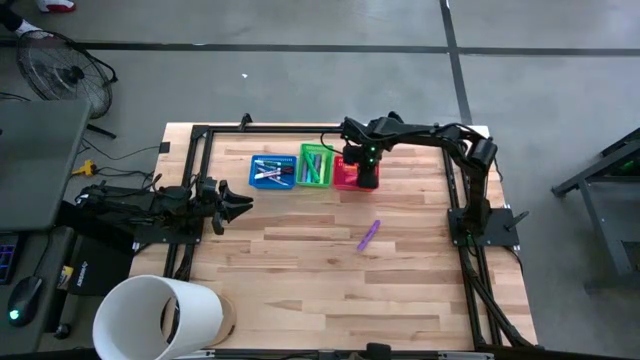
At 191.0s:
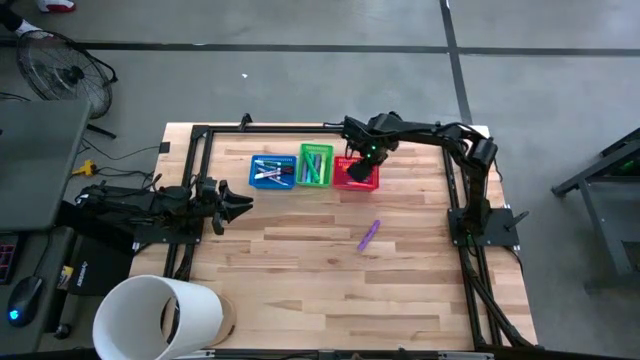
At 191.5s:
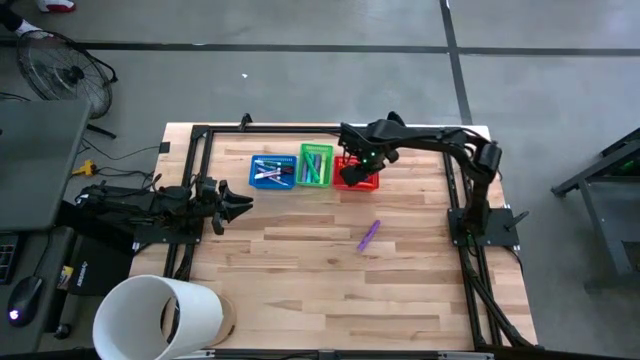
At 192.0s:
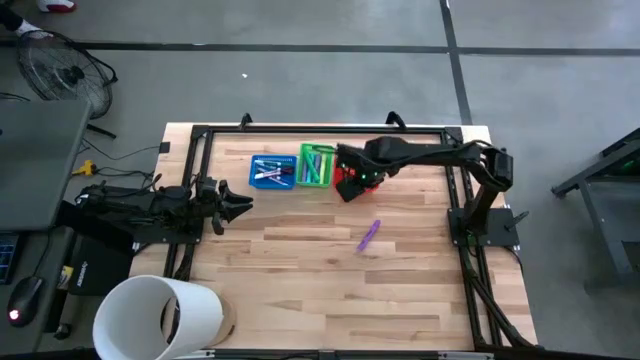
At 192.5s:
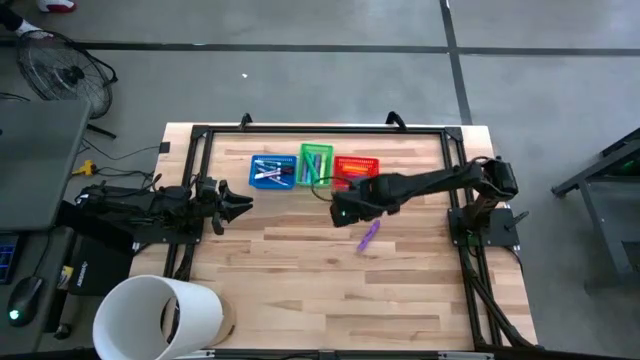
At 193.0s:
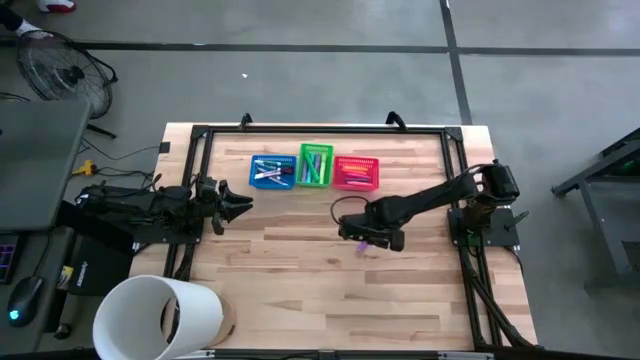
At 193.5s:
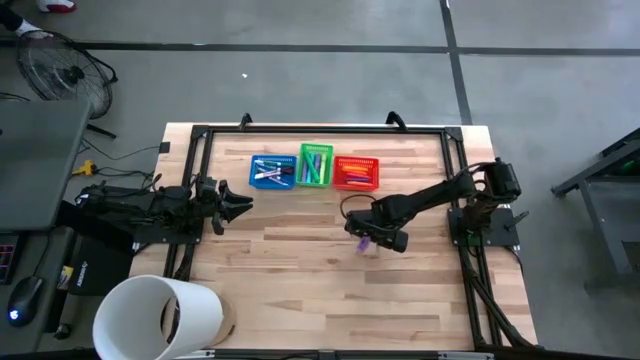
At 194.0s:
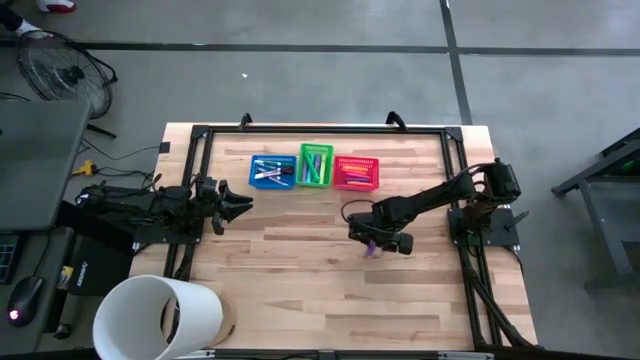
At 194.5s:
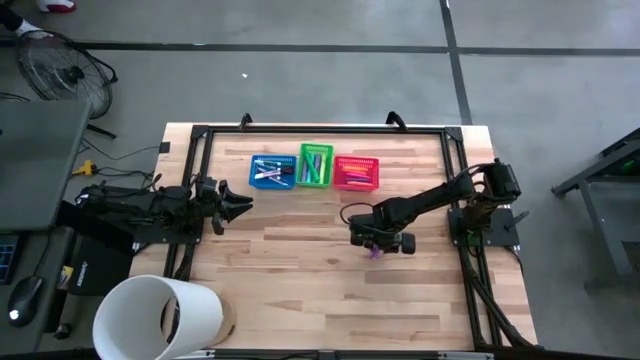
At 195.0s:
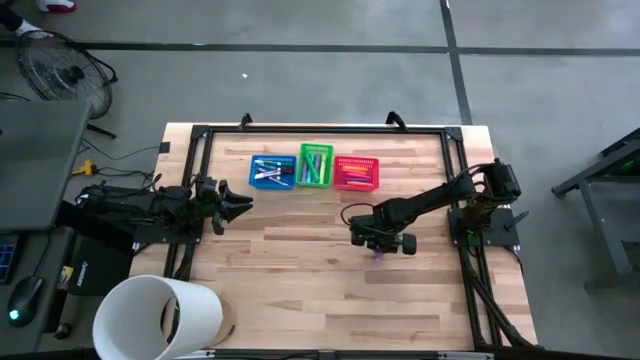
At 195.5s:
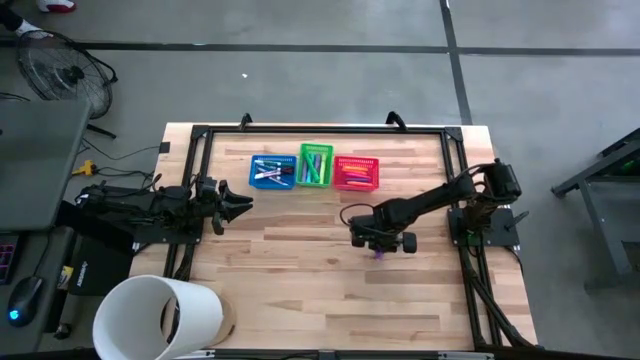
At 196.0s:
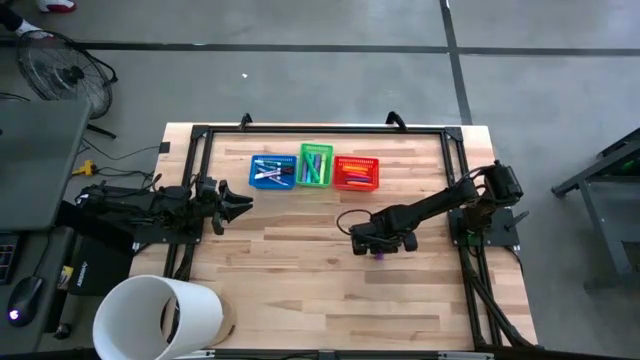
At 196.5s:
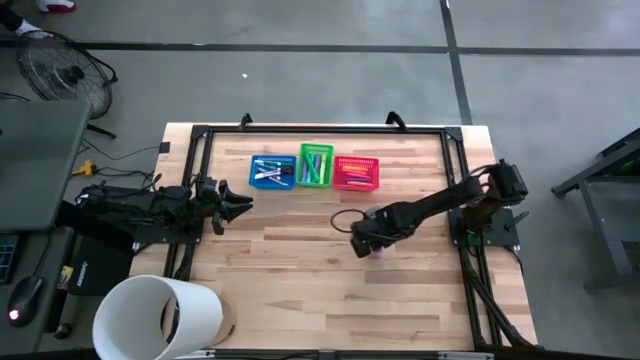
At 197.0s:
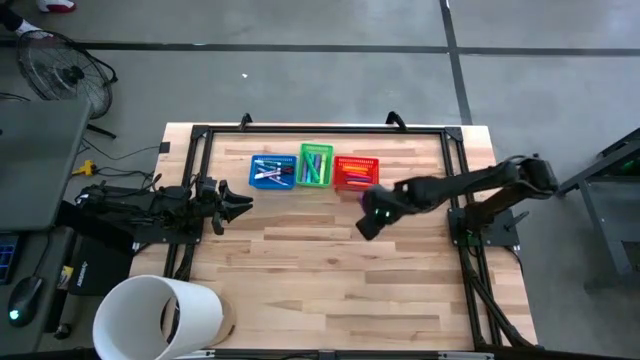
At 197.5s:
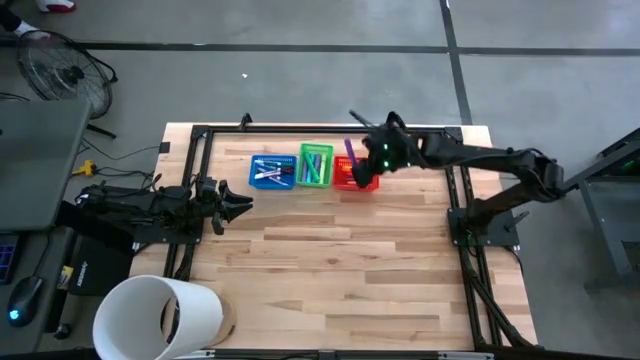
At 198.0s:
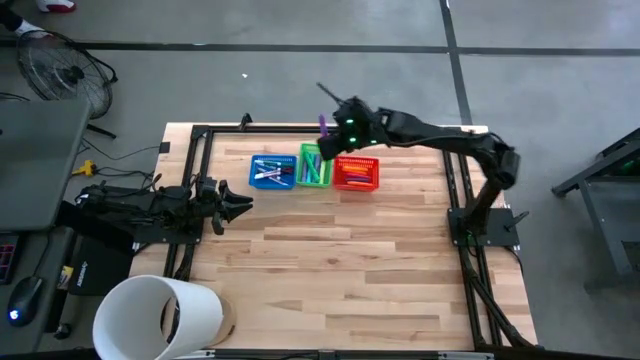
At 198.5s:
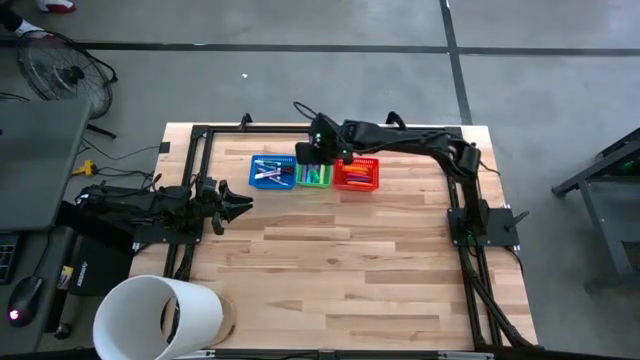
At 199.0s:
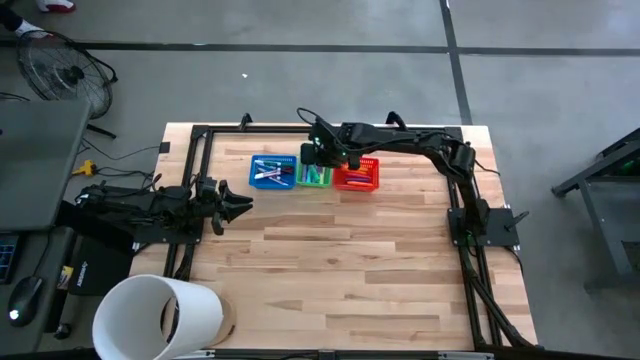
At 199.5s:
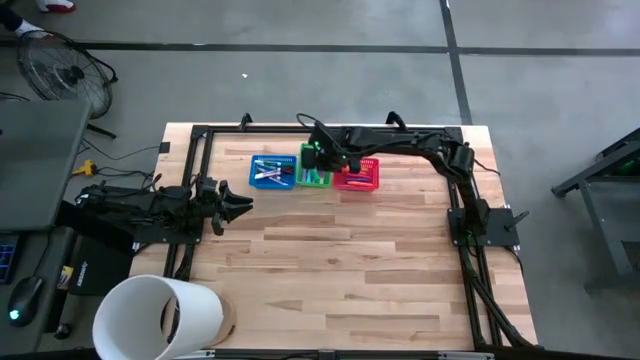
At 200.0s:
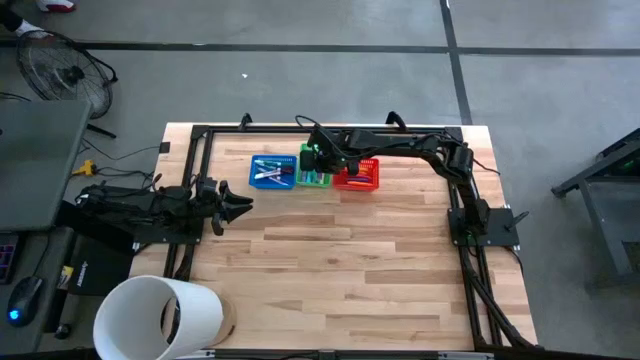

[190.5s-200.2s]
Task: Pick & Place Markers
Put the purple highlighter into the green bin

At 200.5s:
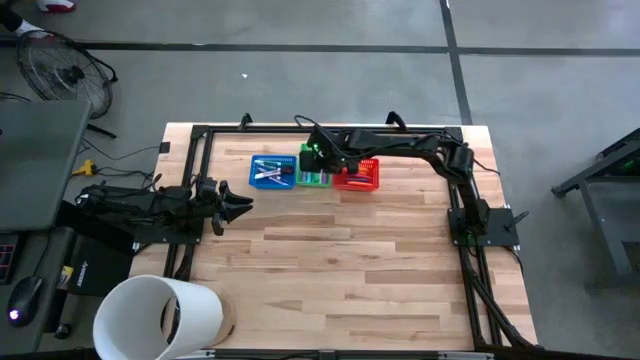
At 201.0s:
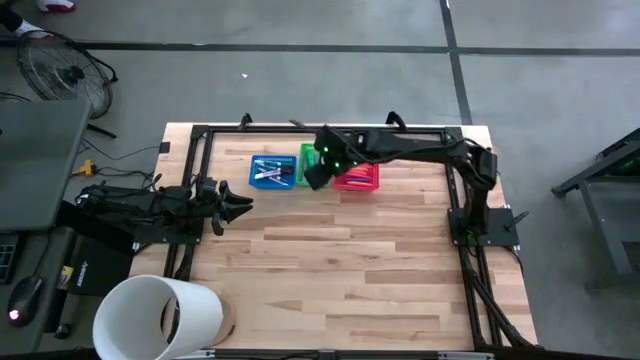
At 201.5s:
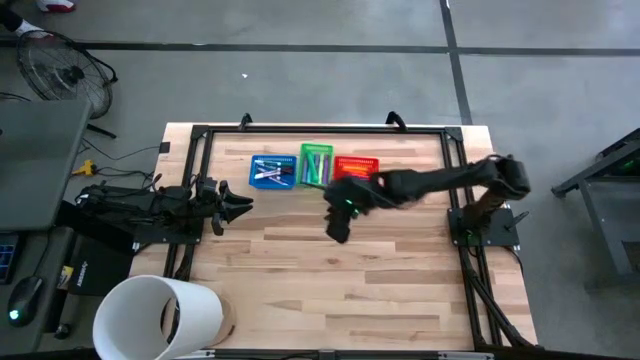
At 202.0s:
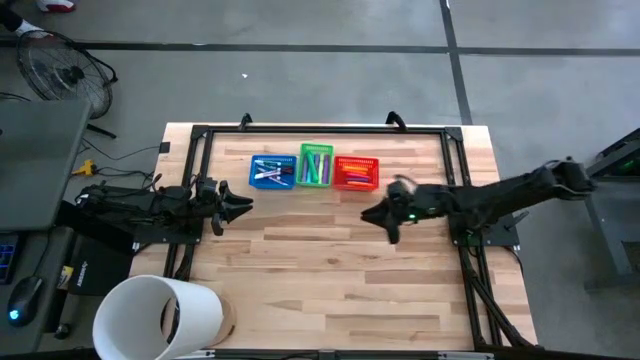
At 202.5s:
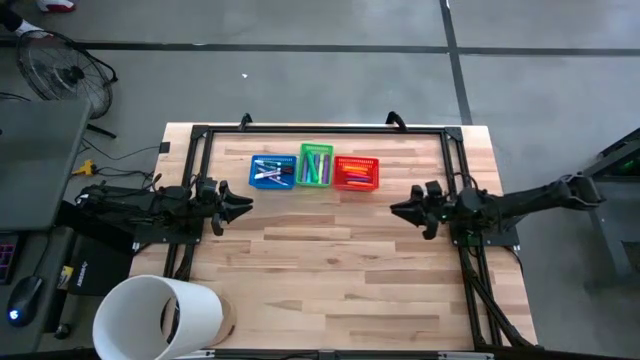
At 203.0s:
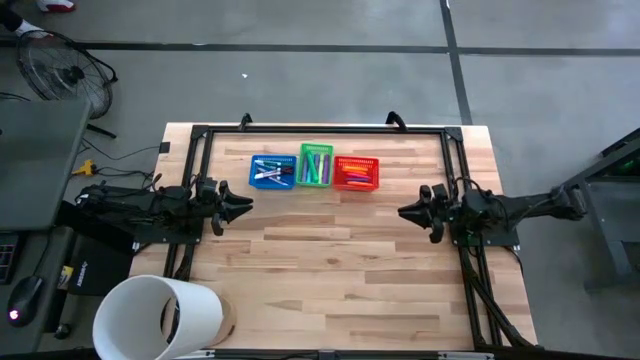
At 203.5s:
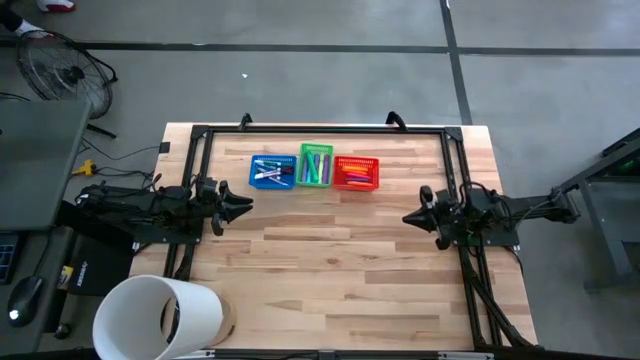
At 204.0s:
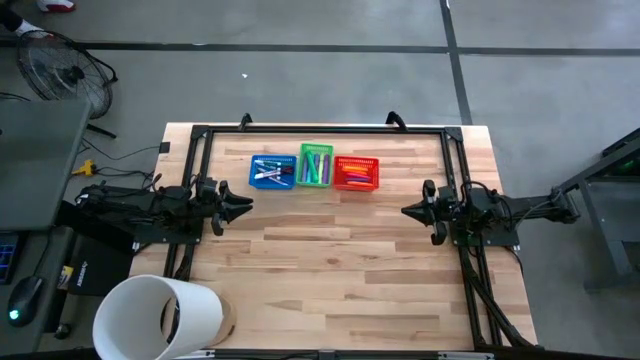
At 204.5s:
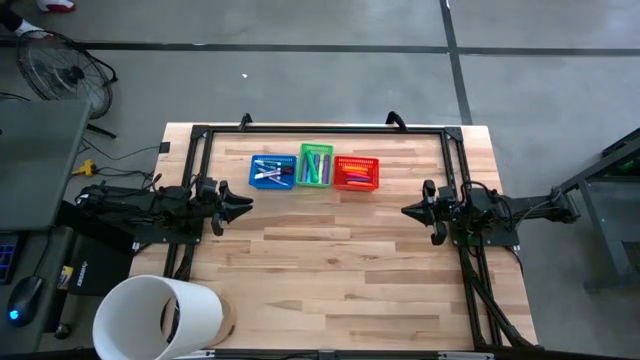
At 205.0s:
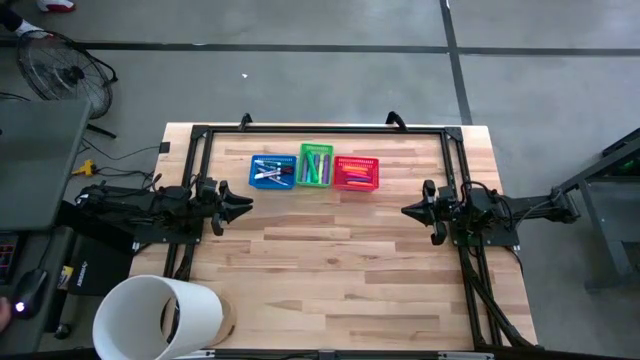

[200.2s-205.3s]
Return to Home Position

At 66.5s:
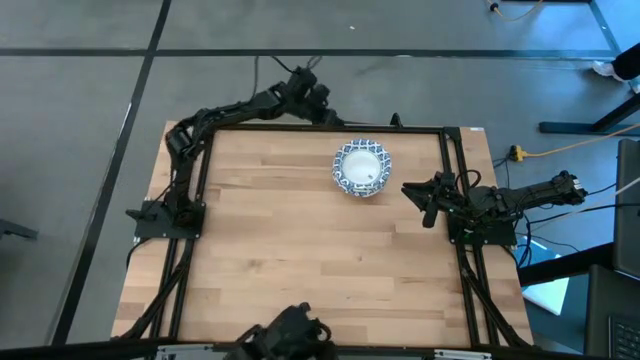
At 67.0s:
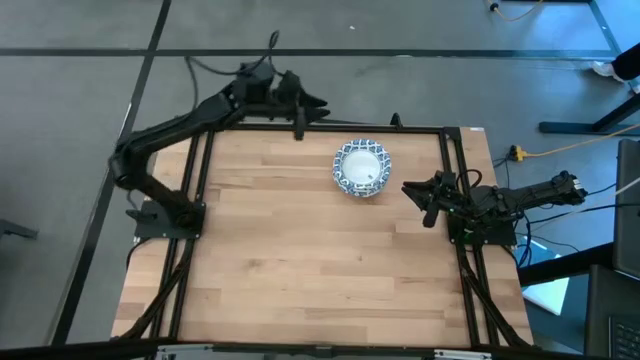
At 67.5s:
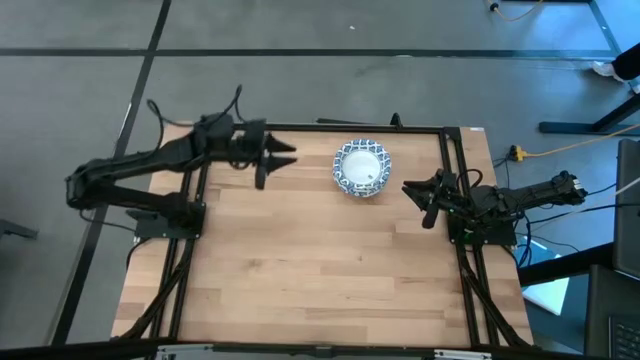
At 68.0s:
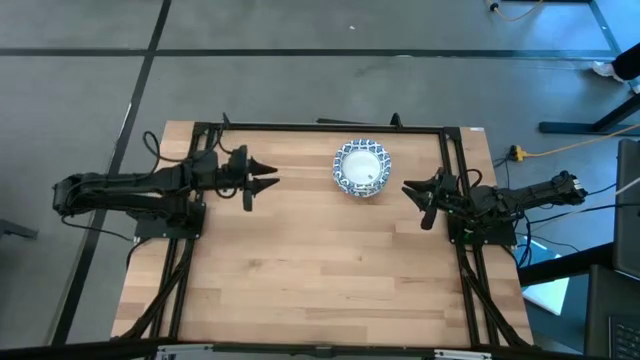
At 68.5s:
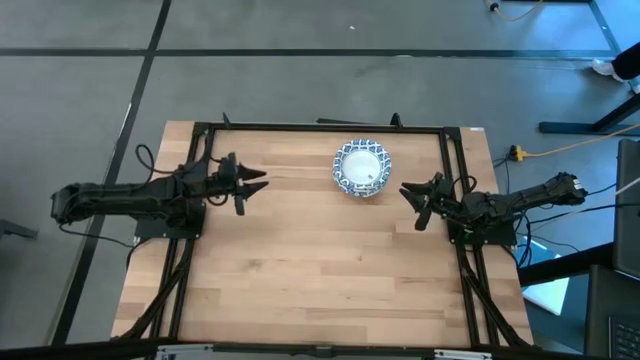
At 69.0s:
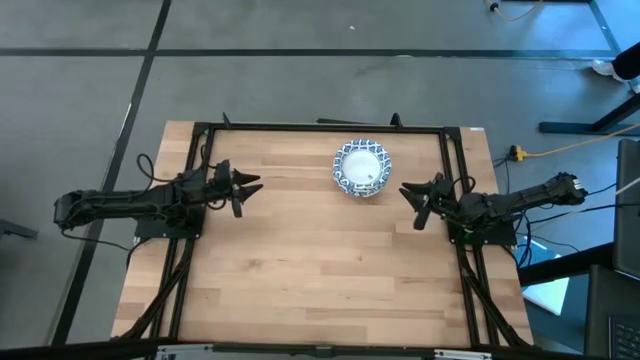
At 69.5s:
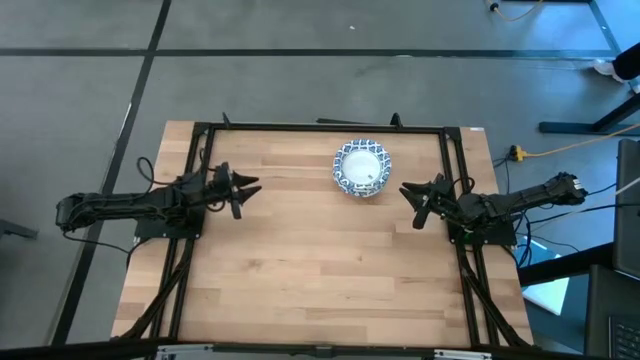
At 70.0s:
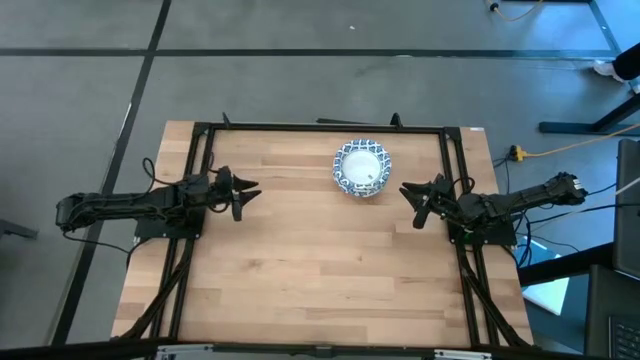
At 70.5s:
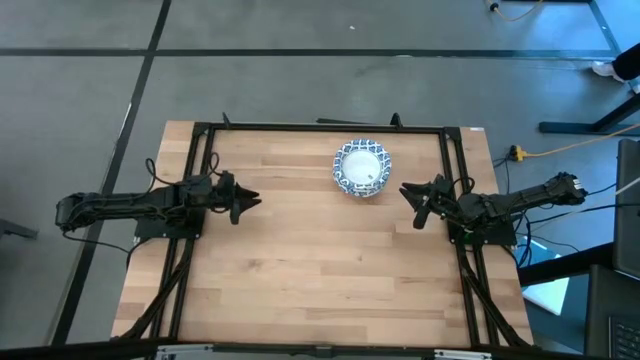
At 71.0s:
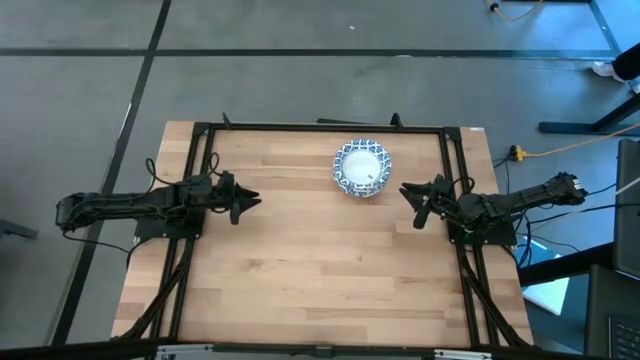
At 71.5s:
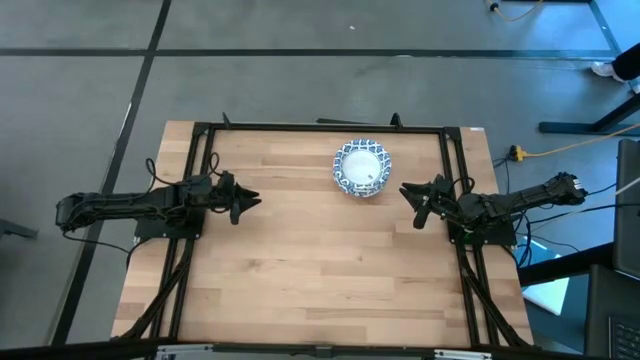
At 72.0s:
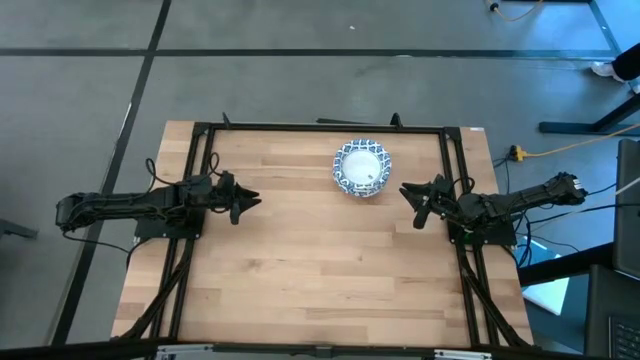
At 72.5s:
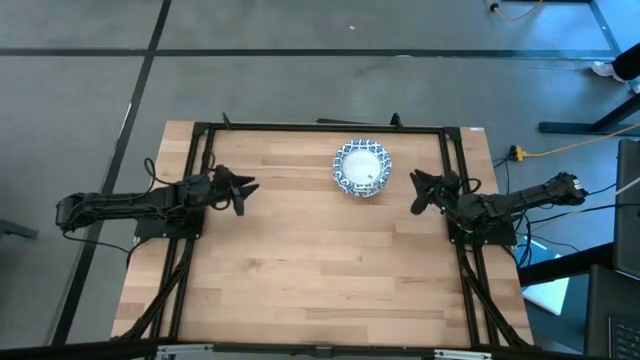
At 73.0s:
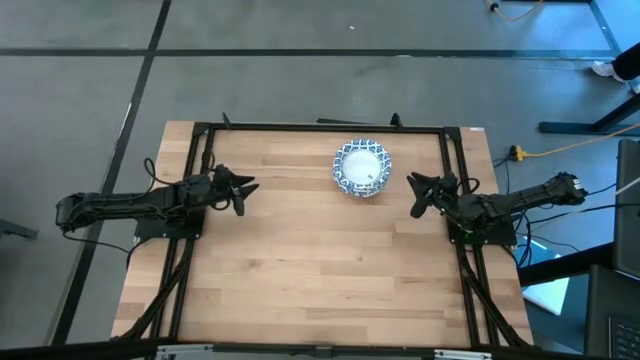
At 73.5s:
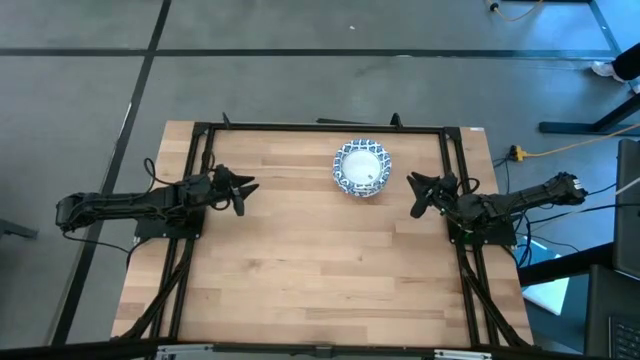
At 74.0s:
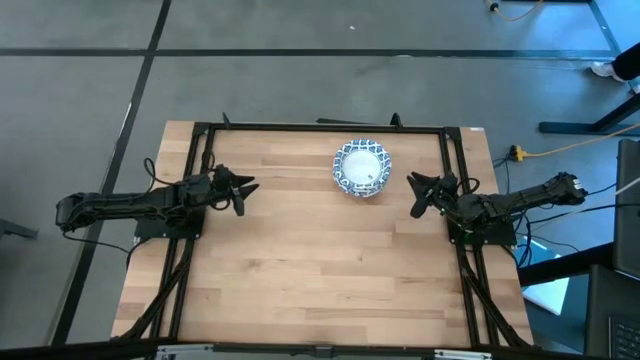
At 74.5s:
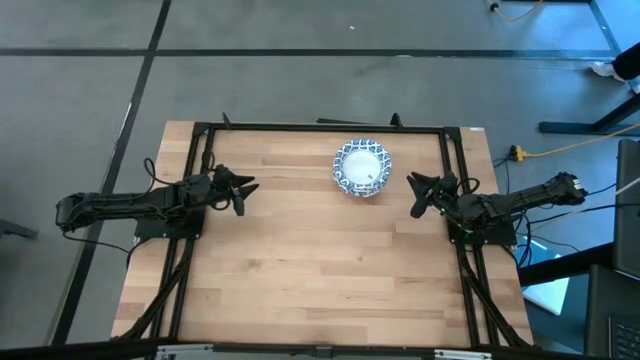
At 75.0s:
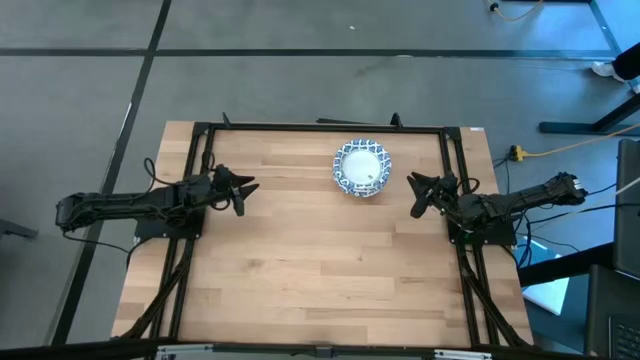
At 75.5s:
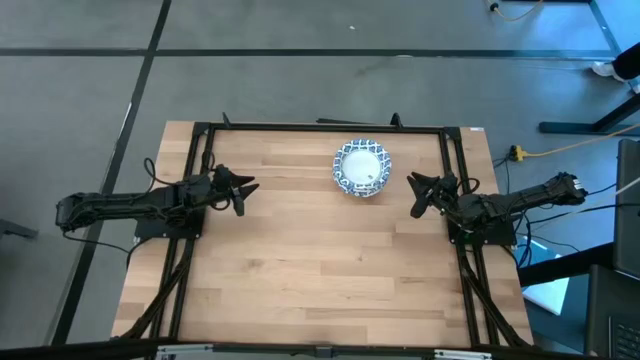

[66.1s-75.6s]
Task: Nest bowls inside each other
Return to home position
